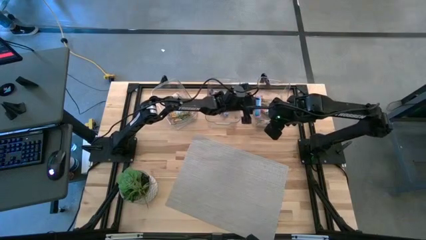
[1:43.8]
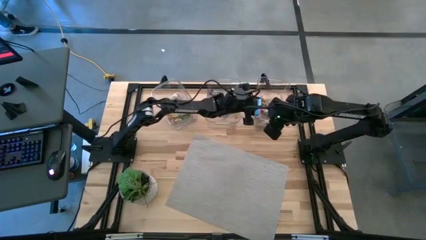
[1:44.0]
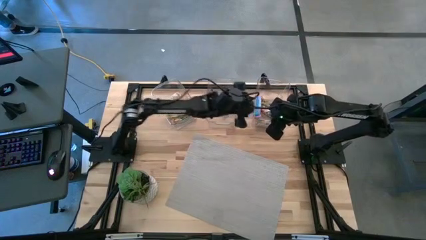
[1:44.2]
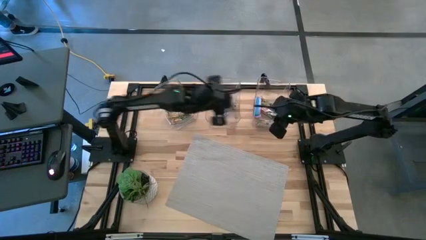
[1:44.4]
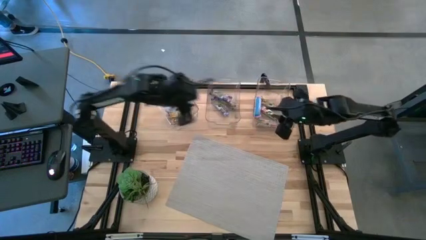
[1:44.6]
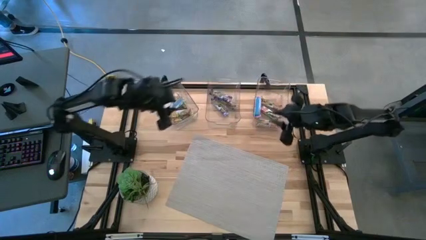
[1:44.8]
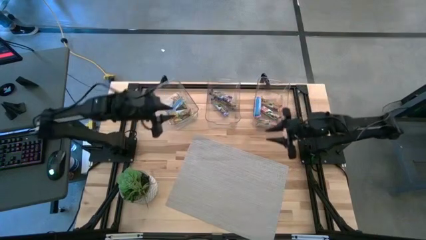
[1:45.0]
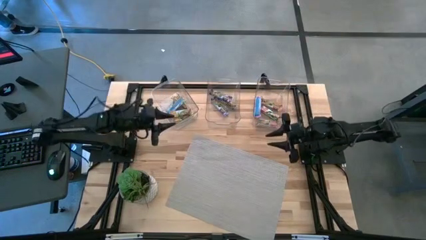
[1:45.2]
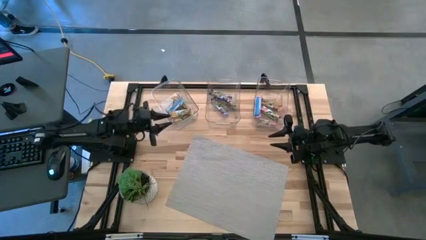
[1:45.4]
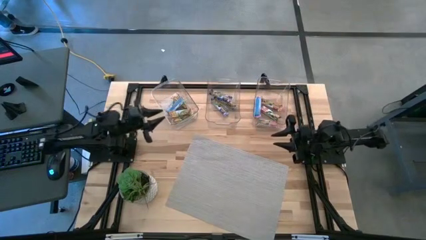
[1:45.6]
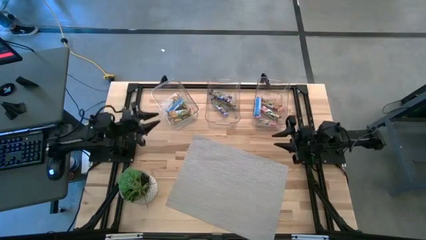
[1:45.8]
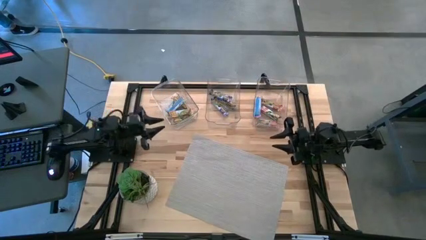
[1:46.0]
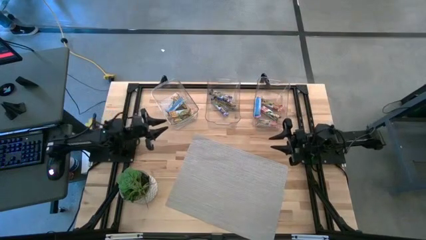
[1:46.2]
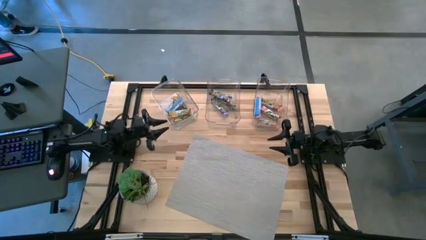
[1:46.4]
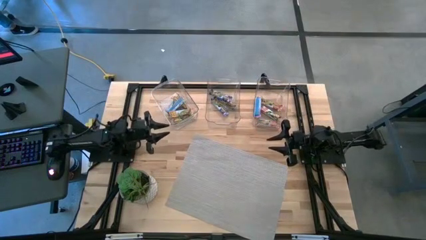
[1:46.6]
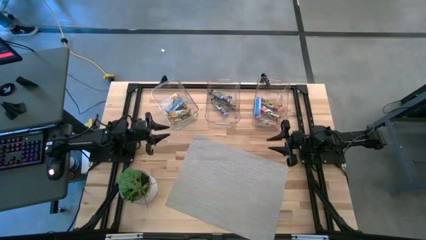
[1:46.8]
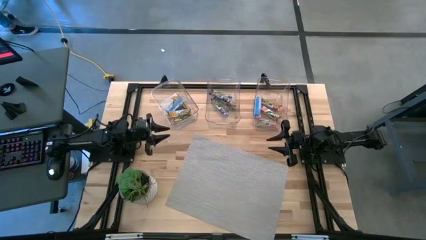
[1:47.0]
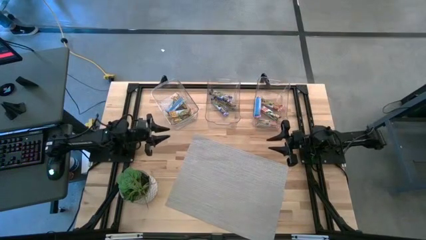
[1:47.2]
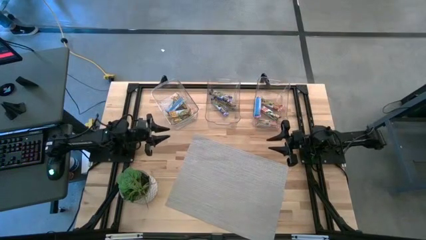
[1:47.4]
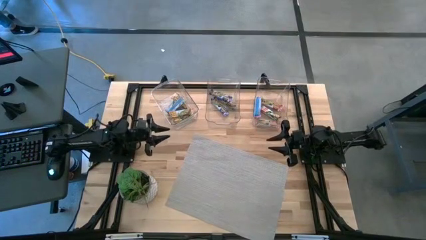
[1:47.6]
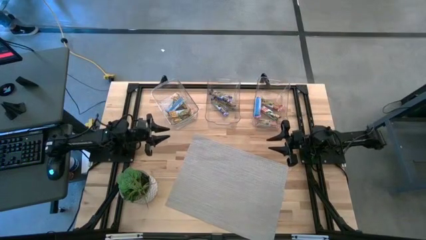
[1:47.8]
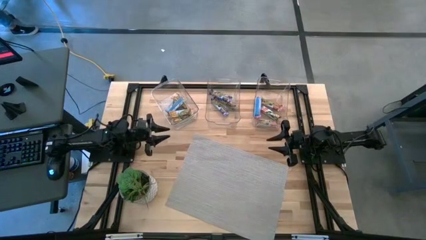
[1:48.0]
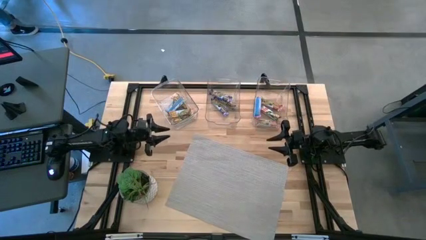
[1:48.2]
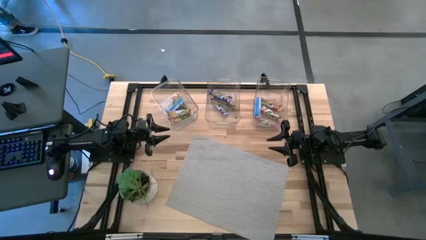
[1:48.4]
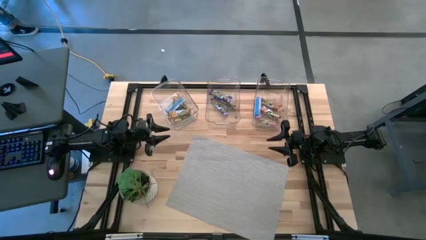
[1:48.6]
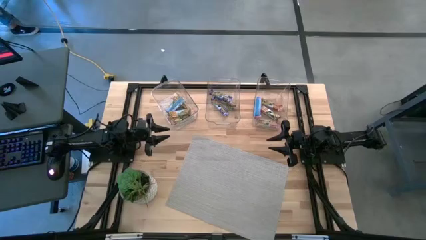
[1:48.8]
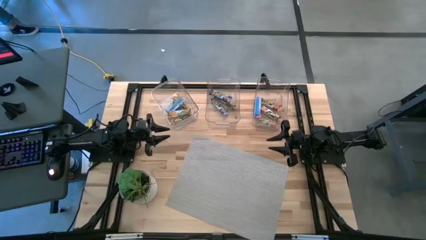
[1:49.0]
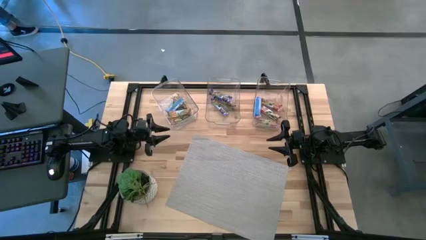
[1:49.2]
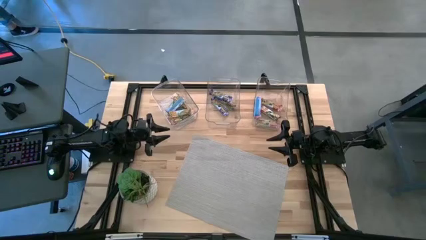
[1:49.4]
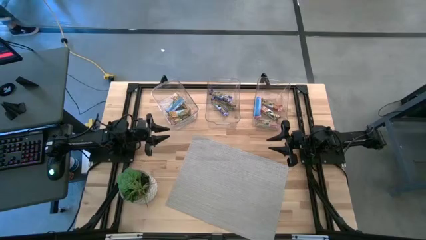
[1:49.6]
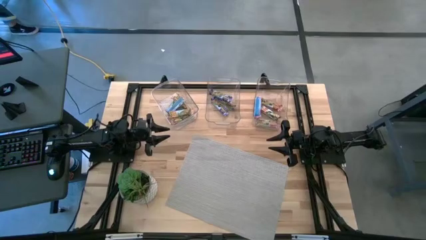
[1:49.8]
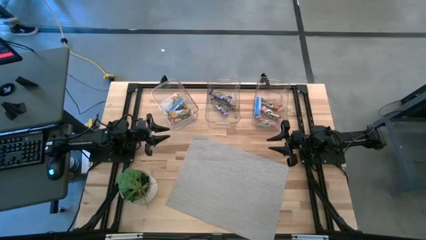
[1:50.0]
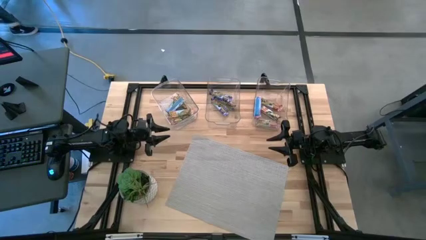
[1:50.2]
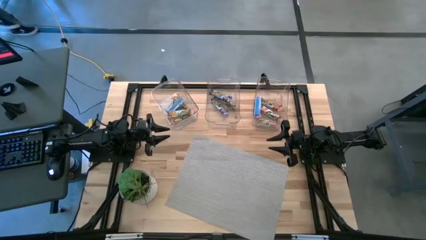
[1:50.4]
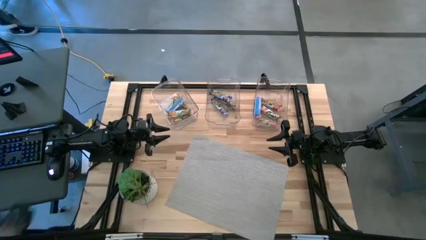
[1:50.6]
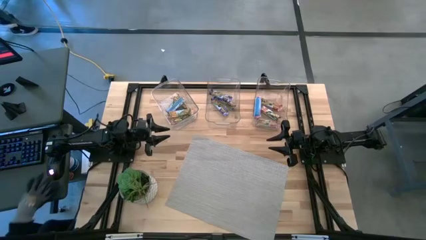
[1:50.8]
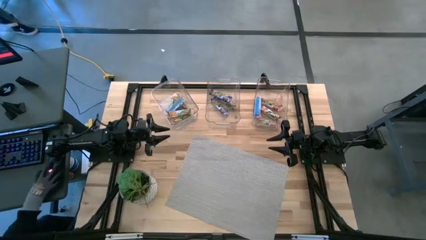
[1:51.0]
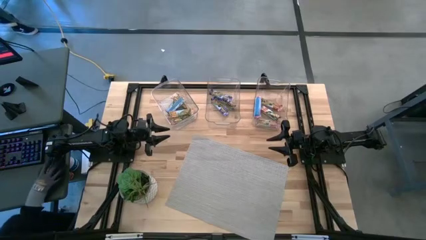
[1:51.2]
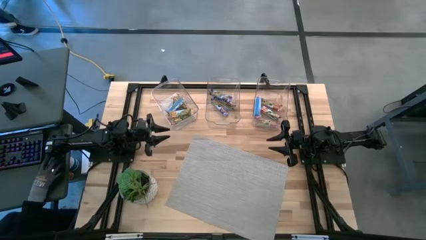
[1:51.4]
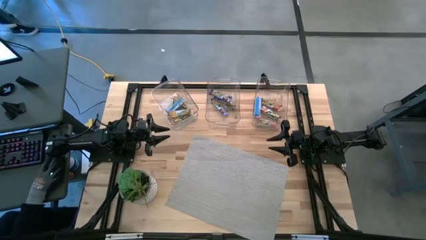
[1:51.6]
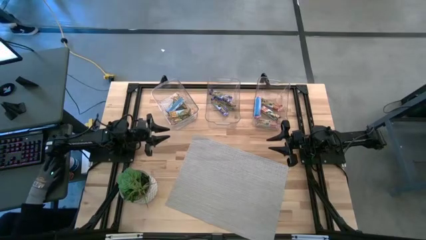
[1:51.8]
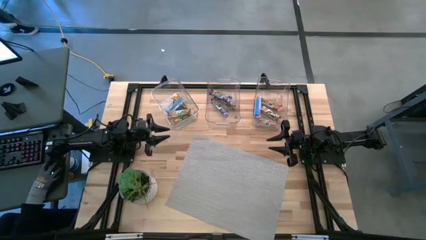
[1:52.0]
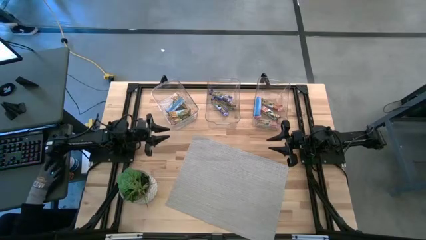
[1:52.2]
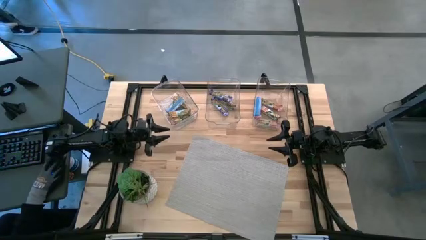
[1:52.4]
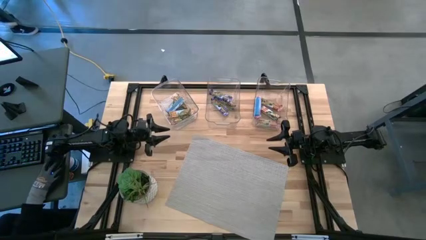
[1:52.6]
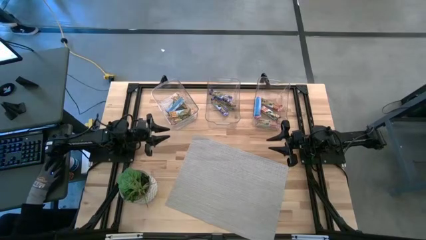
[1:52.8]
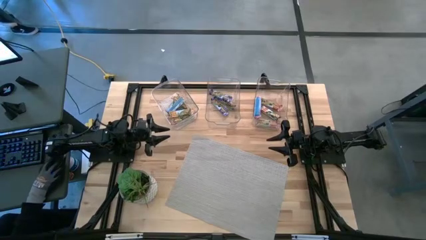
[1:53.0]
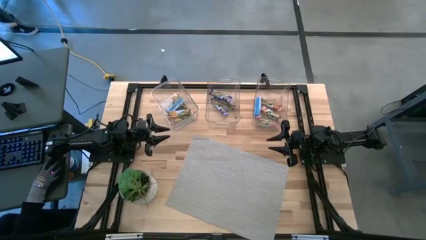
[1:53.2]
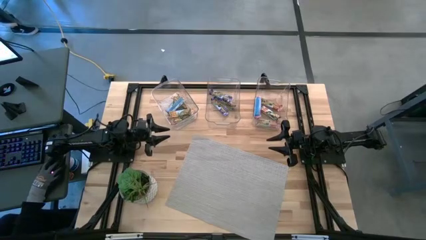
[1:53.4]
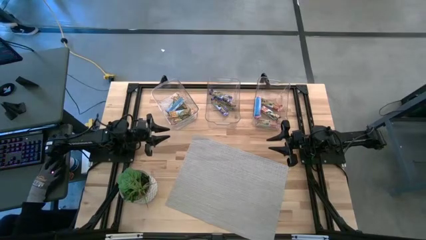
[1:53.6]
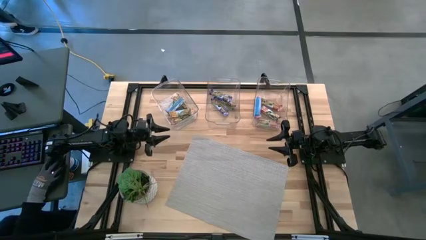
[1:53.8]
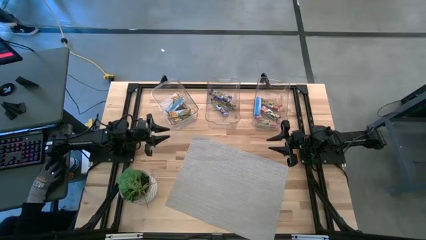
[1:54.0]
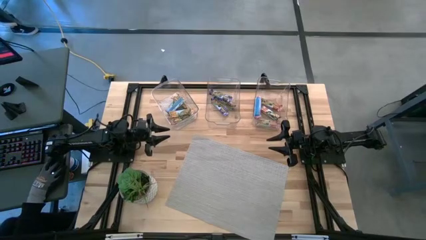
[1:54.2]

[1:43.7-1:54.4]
Task: Pick and place Granola Bars by type
Return to Home Position

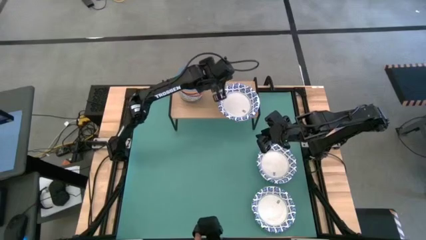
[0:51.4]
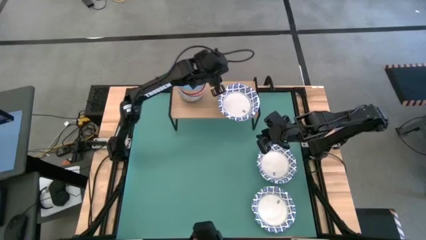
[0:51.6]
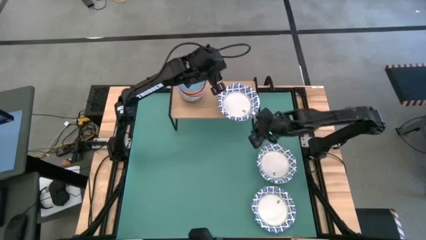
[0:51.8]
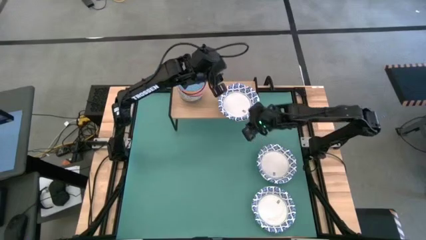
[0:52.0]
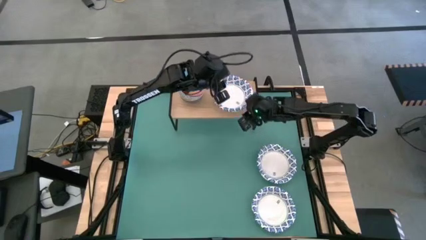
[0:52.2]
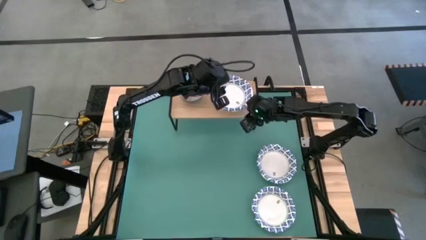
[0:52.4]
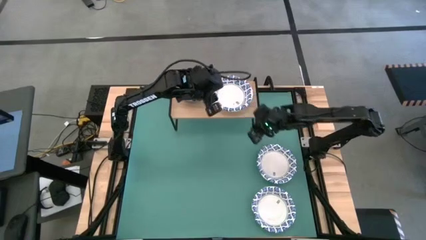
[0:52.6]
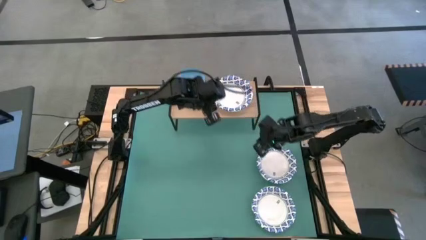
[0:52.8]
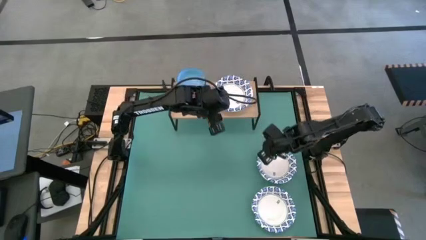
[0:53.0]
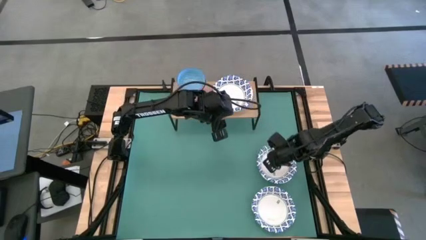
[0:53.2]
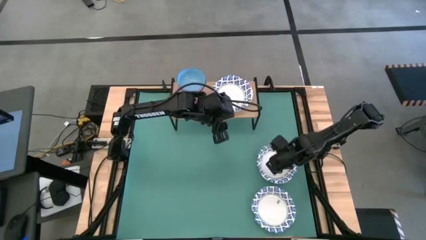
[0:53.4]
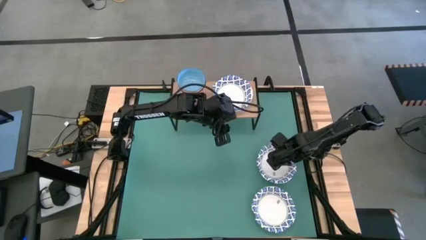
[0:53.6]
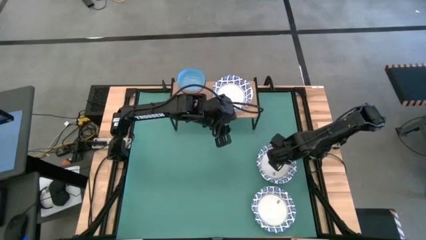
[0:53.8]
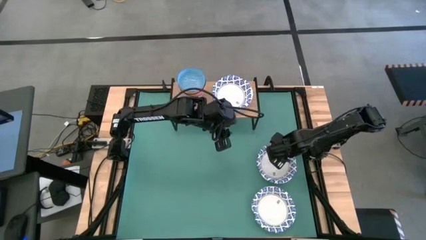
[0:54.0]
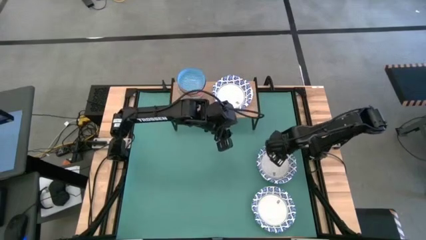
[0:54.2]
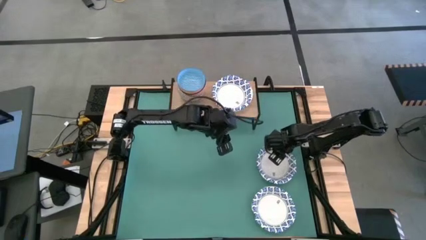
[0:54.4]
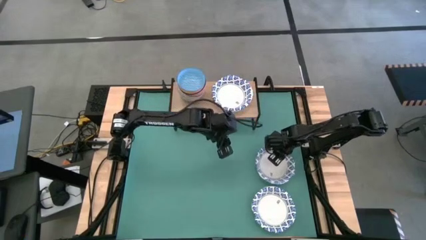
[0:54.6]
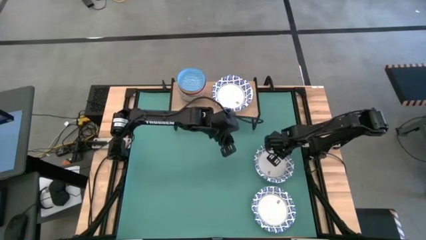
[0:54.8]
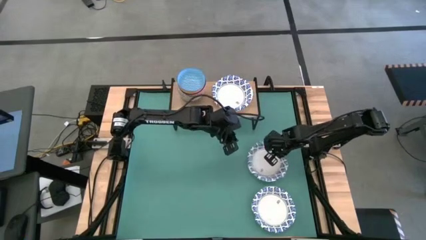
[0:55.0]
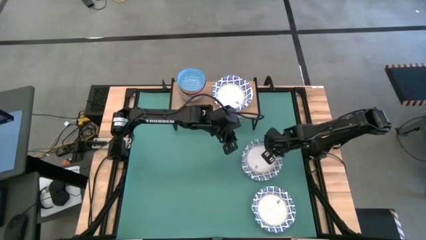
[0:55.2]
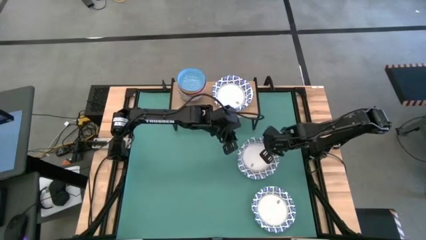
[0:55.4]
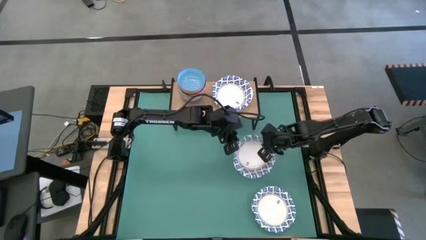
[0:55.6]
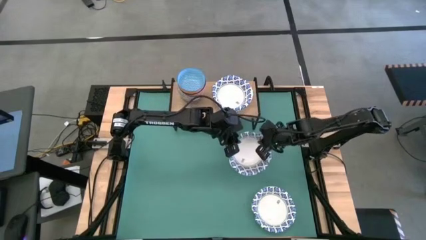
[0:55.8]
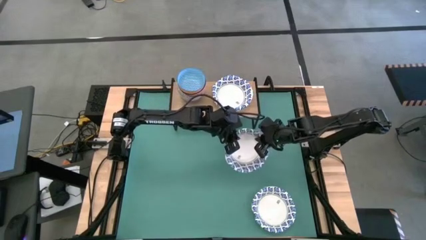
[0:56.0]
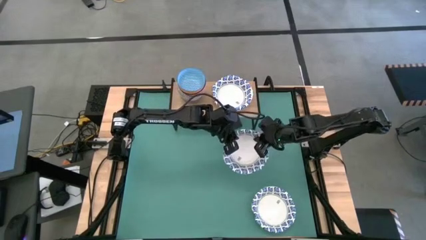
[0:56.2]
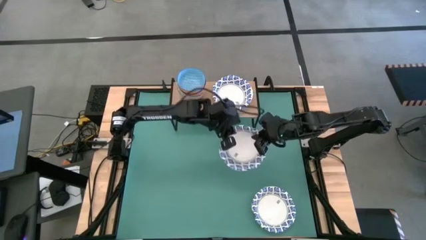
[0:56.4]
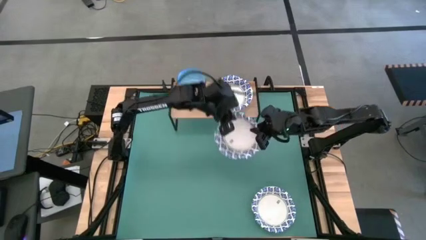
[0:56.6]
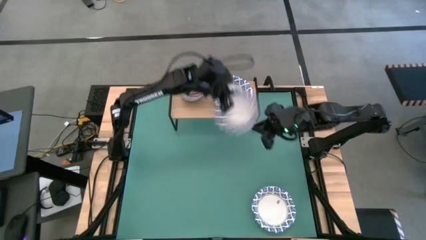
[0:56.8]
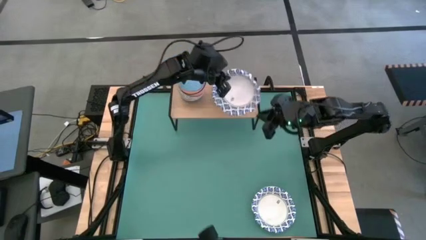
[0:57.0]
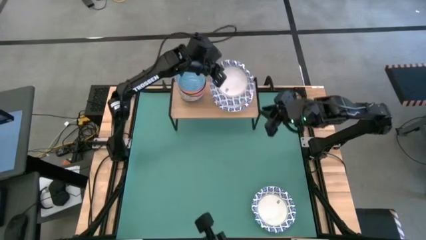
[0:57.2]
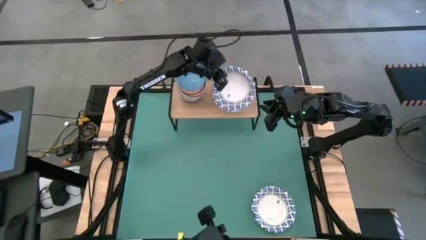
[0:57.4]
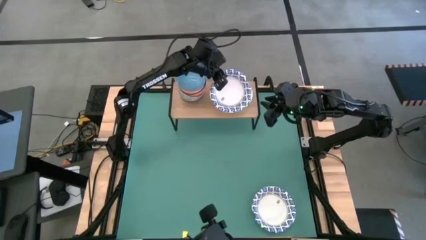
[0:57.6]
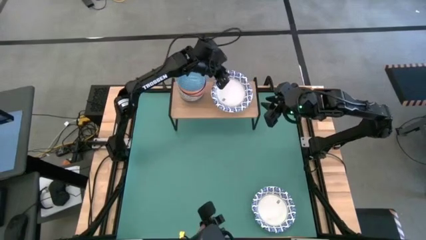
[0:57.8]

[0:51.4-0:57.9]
Task: Place and stack bowls onto a shelf
Stack the white bowl on top of the white bowl on the shelf
